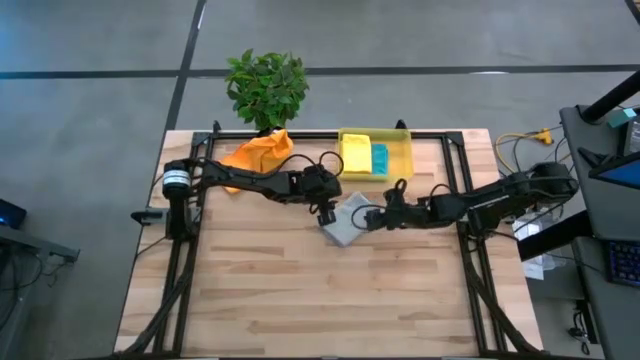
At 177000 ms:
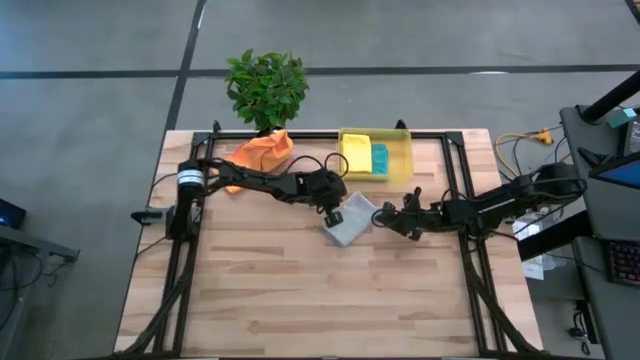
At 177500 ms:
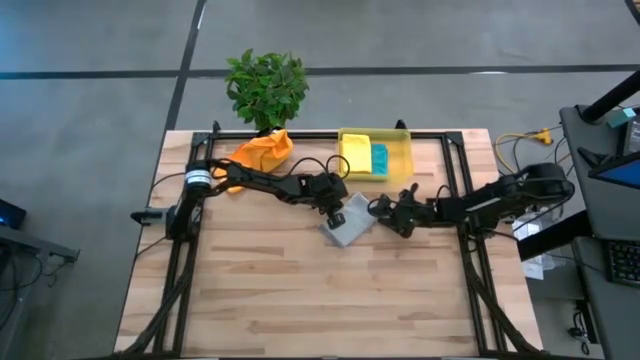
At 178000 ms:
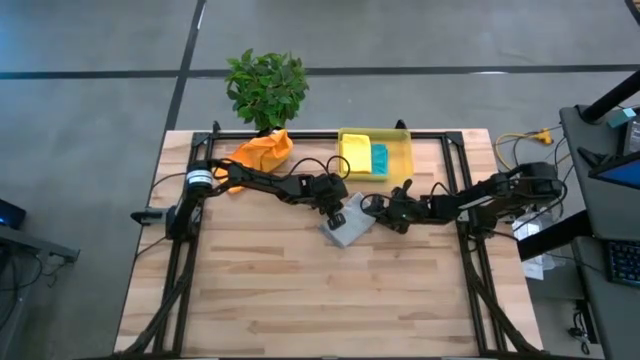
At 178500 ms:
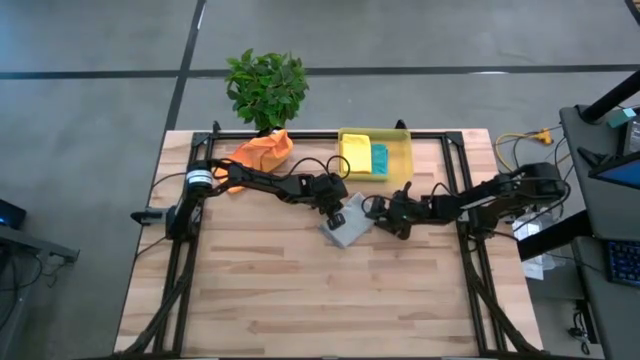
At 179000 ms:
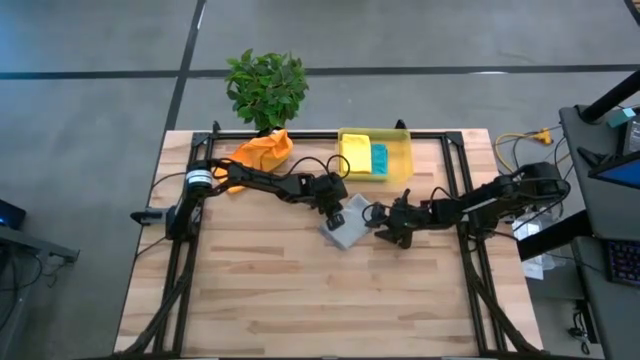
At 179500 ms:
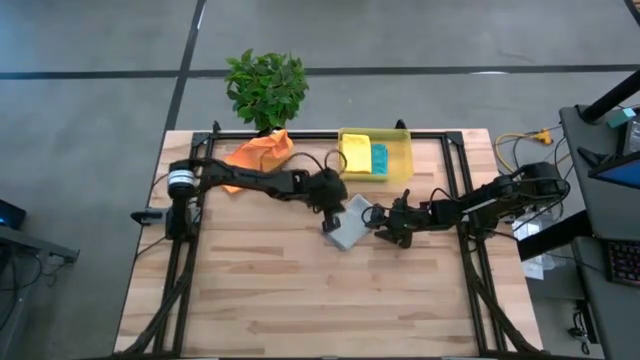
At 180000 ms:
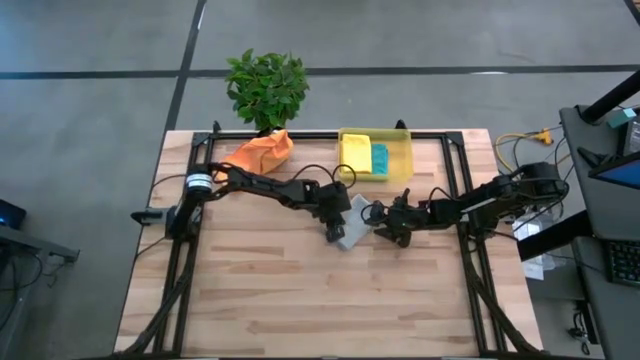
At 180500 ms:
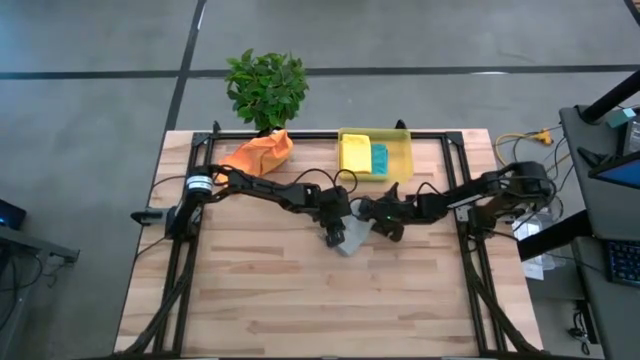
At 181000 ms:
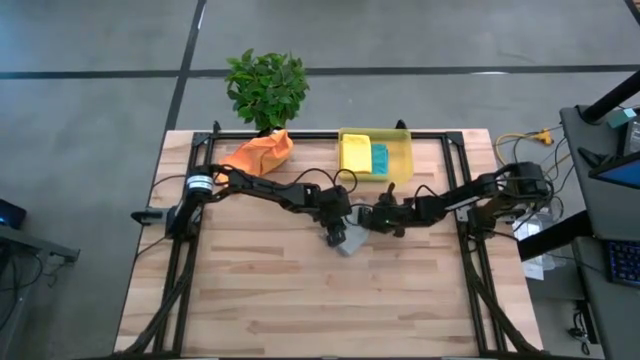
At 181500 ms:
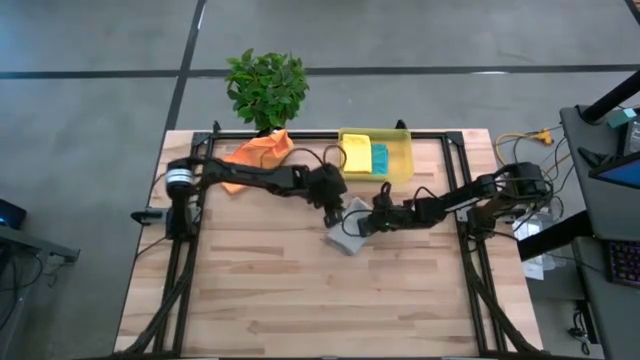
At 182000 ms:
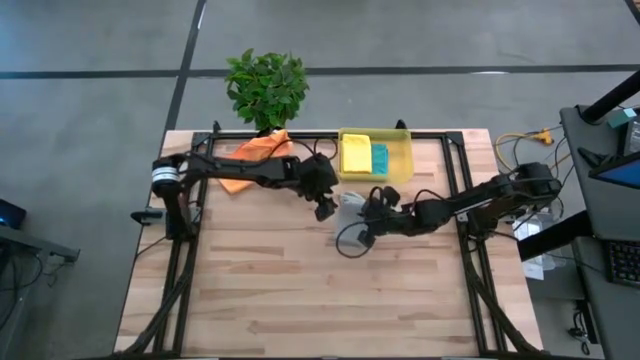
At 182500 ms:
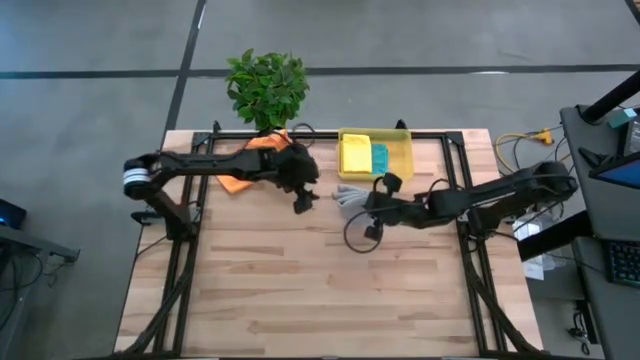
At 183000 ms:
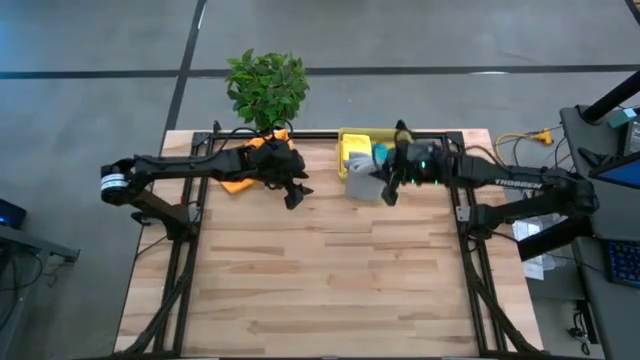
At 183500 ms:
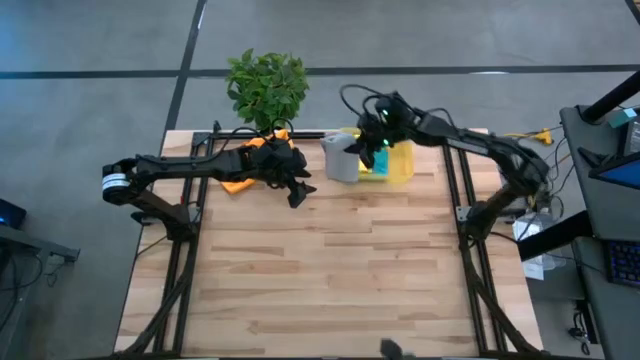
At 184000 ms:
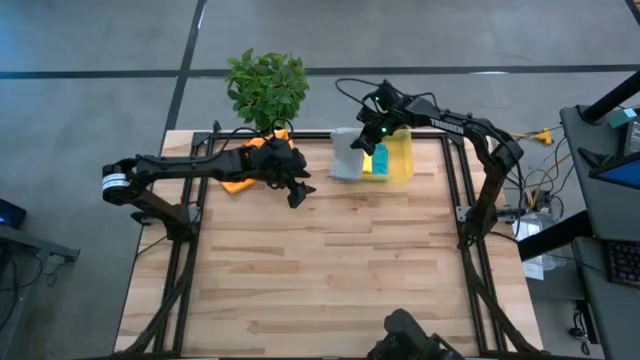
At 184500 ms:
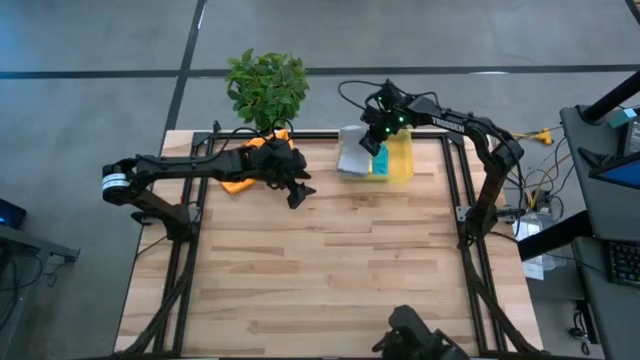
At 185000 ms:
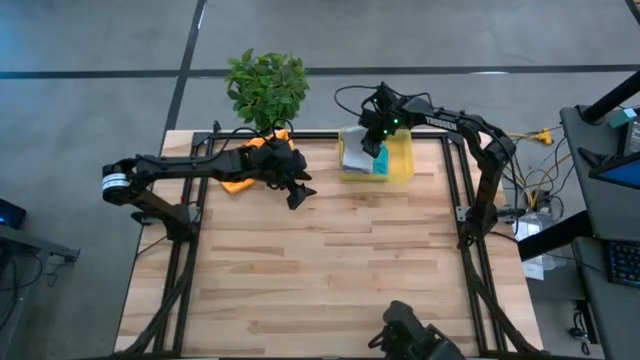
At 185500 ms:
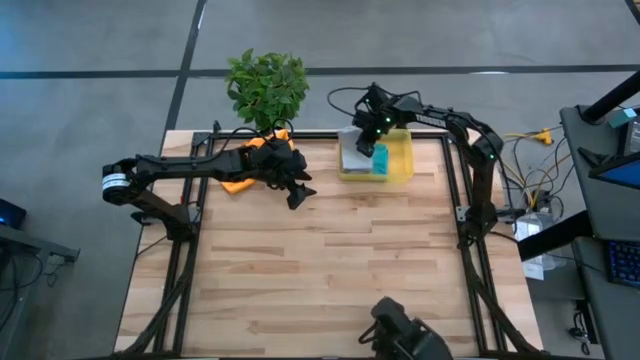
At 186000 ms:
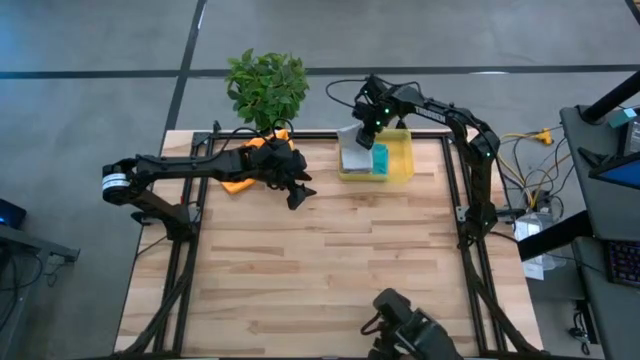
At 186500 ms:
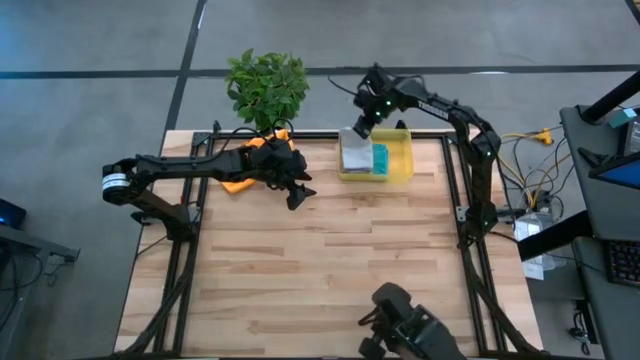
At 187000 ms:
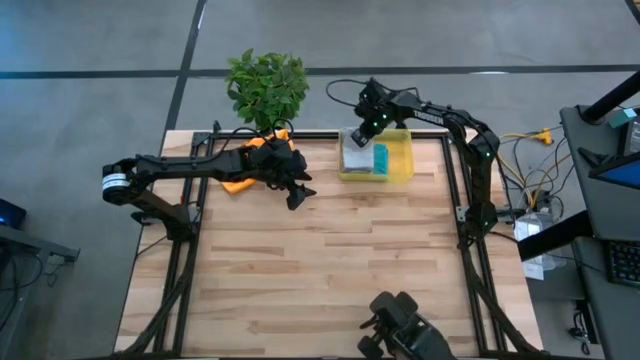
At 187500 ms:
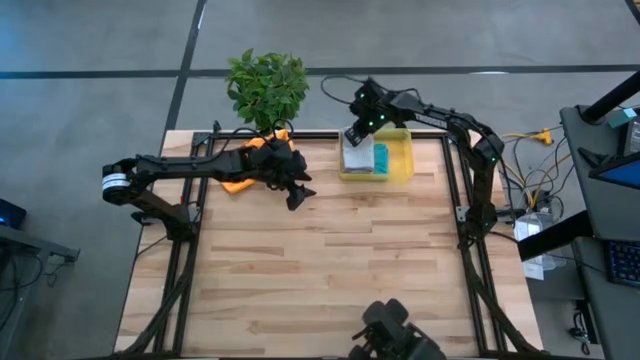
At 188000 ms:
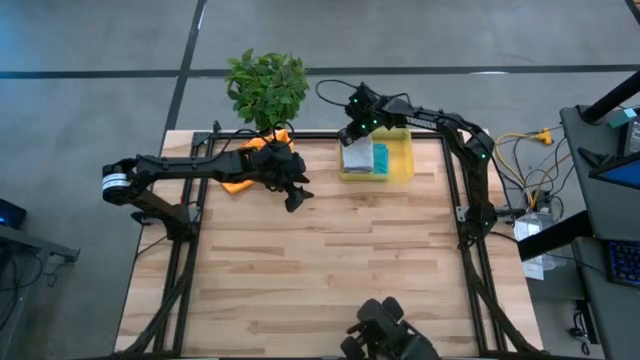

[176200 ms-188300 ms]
Task: Fold microfiber towels
Put the folded gray microfiber towel into the yellow bin

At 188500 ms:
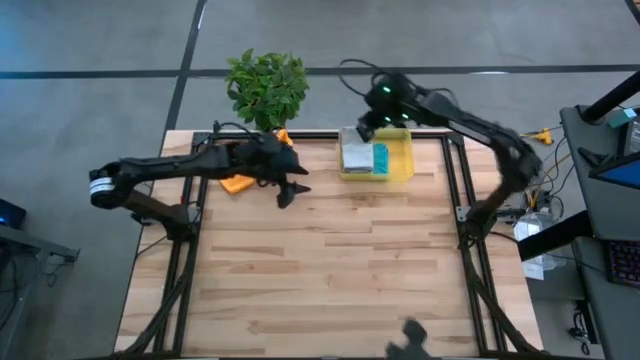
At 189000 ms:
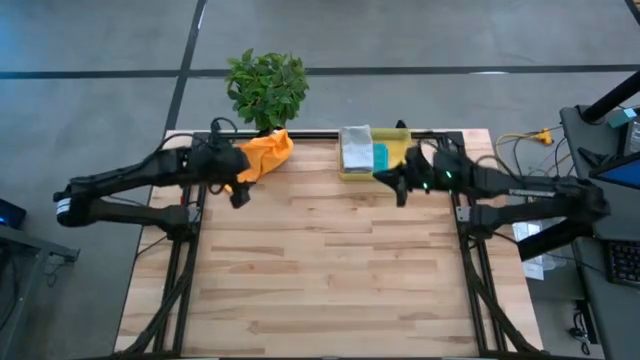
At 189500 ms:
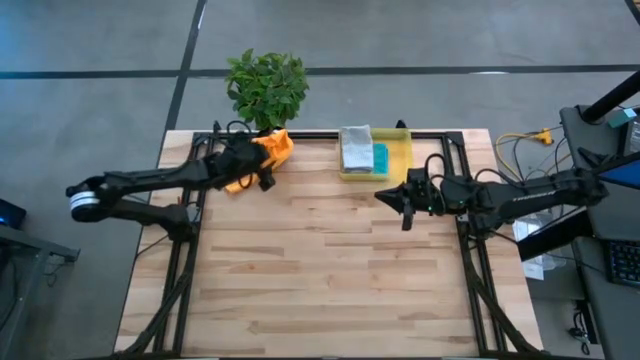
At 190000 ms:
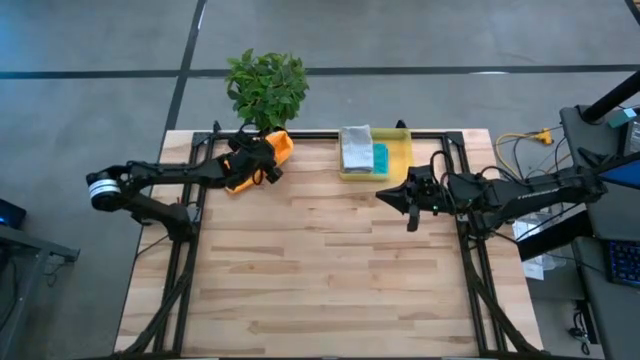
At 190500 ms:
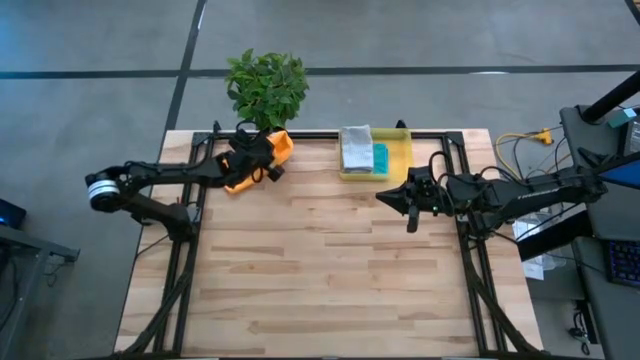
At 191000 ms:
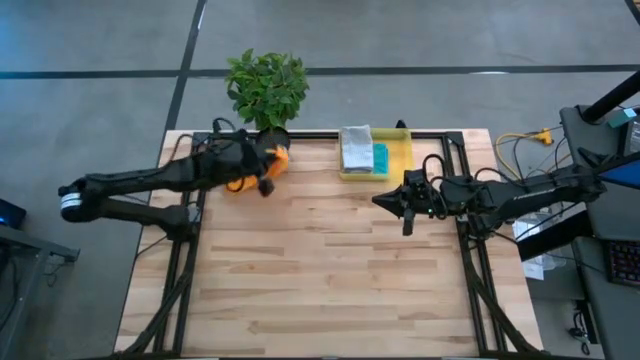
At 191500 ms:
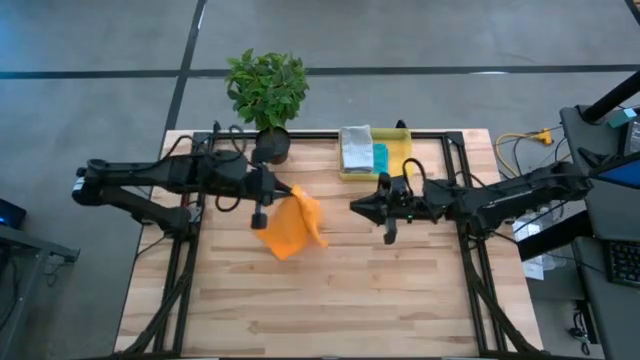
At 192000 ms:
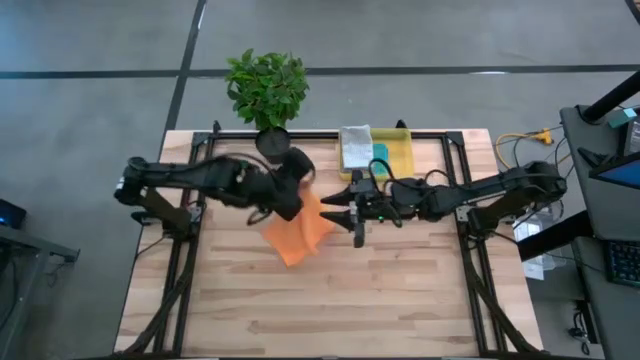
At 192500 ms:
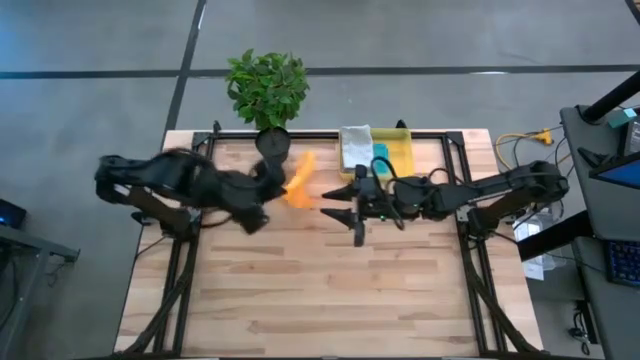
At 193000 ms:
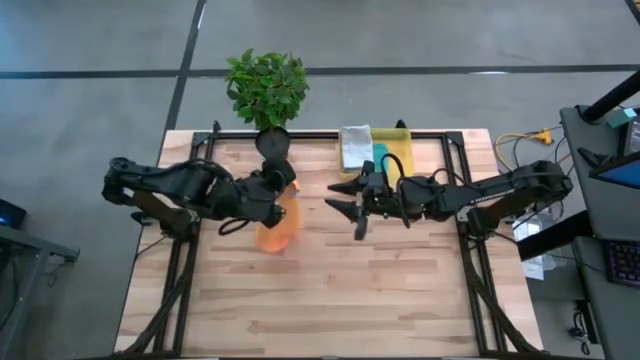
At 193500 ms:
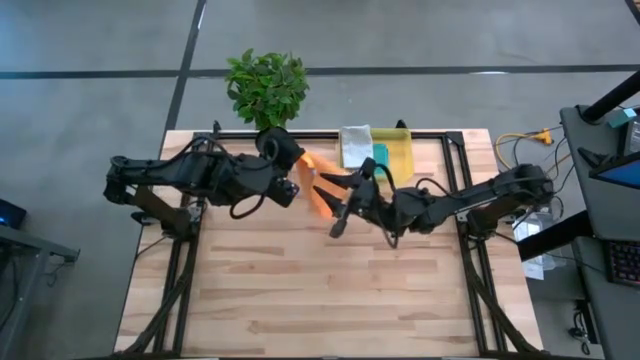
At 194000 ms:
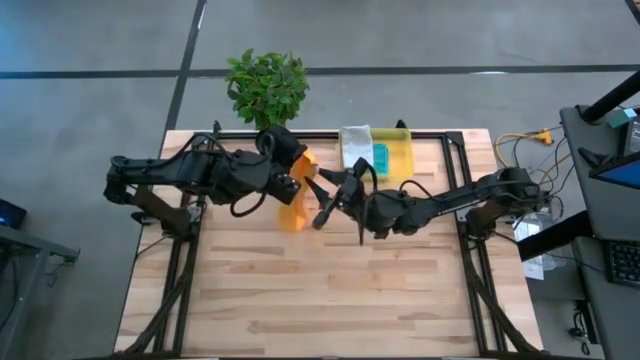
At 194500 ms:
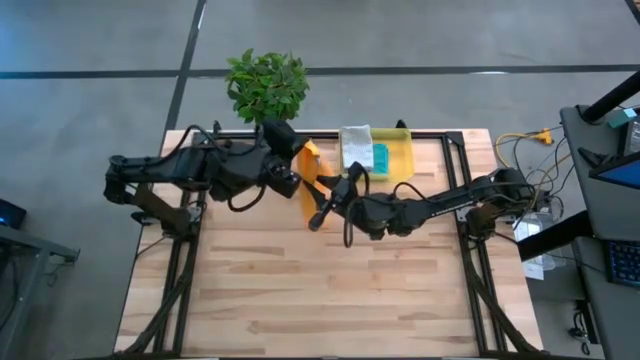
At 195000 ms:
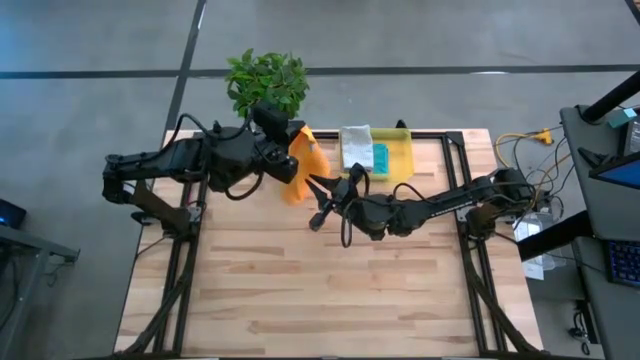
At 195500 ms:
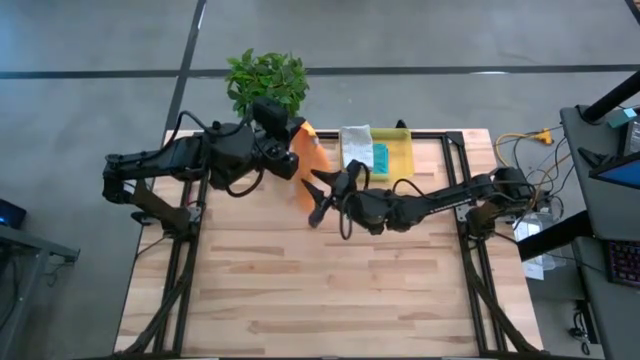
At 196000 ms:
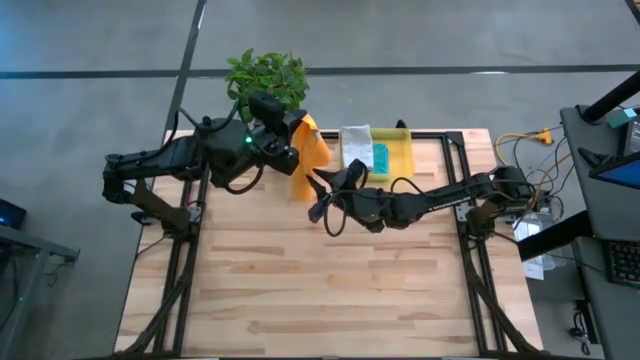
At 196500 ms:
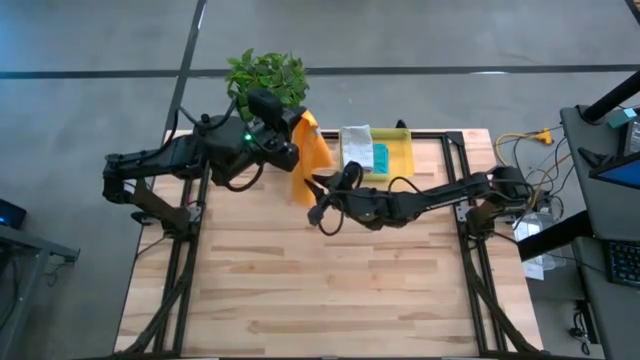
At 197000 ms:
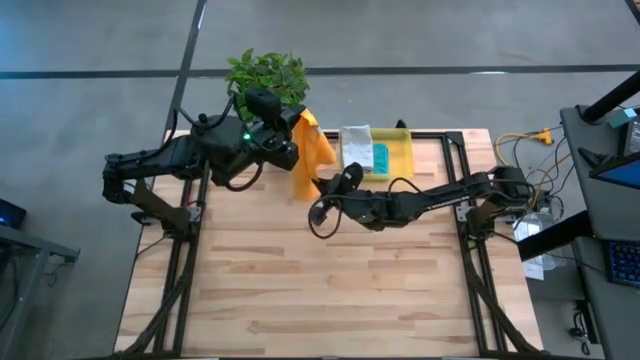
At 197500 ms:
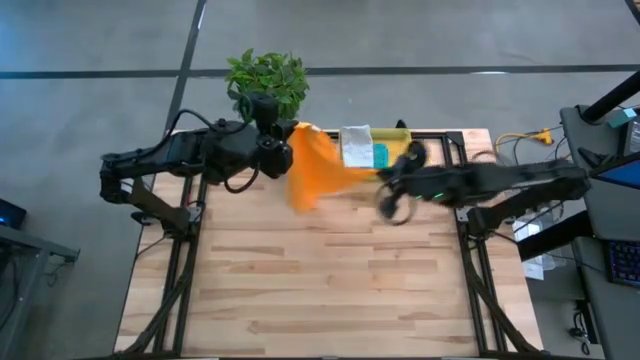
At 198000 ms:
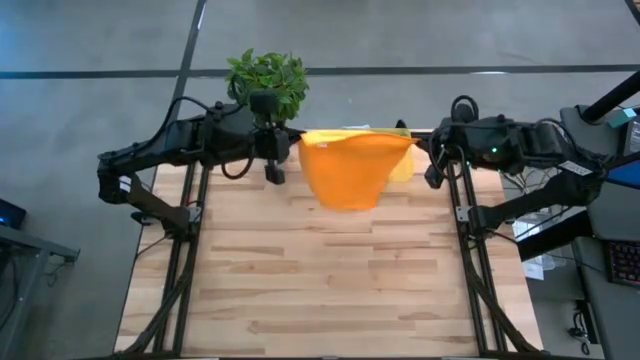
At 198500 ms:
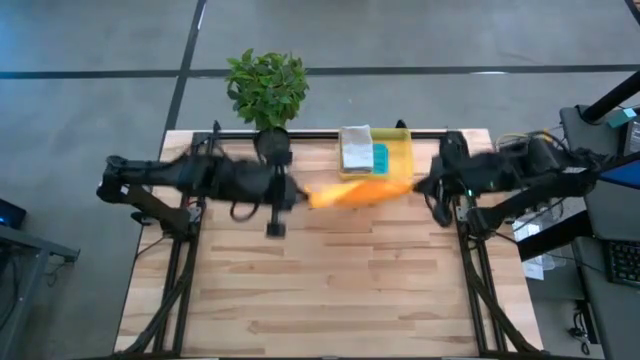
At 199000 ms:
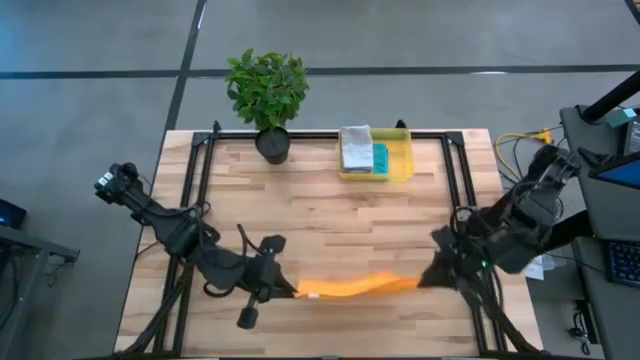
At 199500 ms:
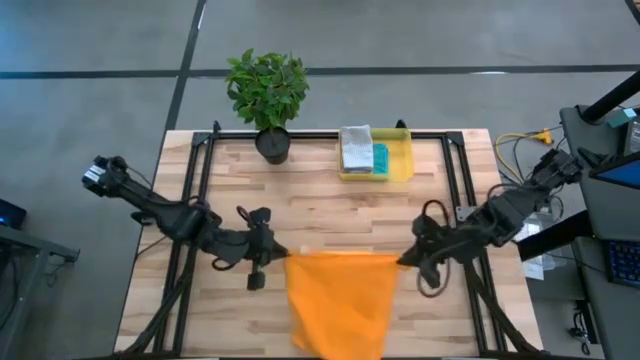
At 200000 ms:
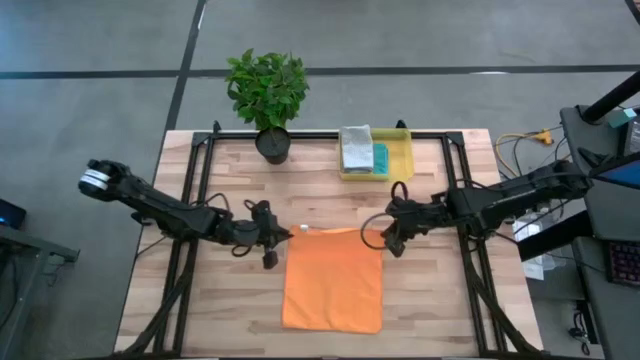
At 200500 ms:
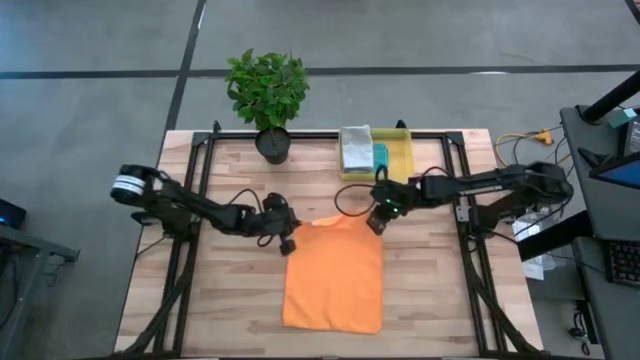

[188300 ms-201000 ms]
Fold the orange microfiber towel
